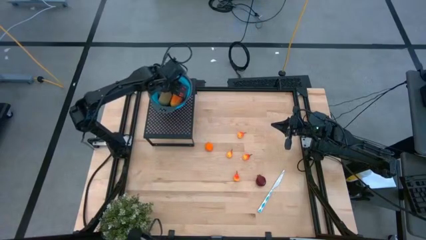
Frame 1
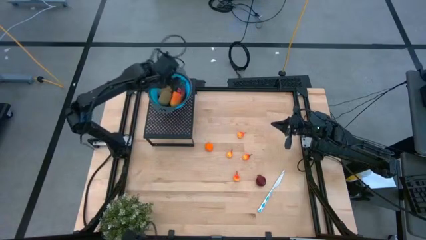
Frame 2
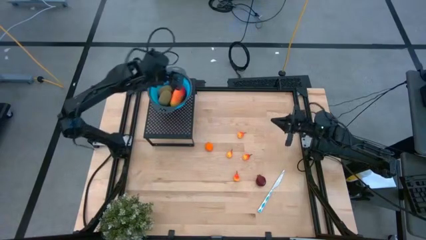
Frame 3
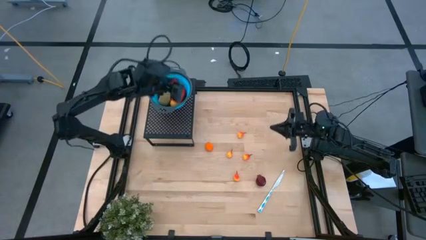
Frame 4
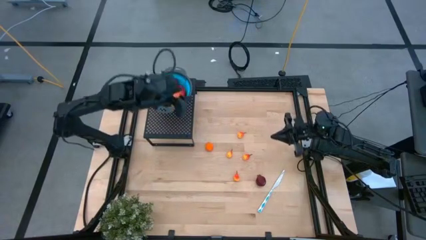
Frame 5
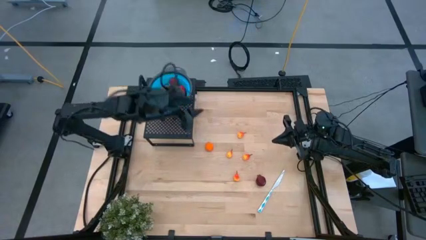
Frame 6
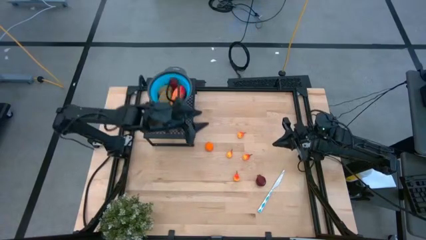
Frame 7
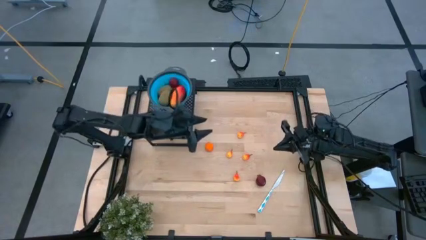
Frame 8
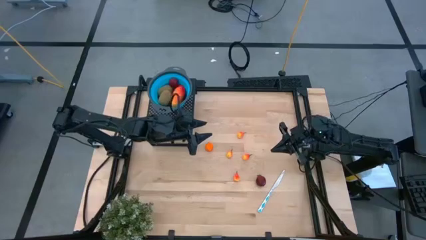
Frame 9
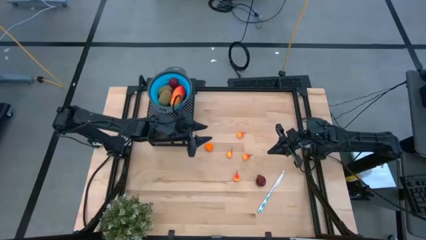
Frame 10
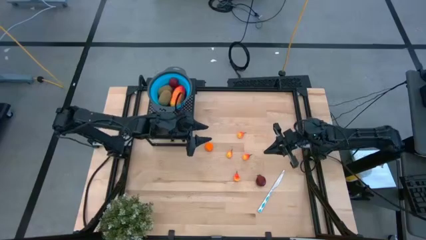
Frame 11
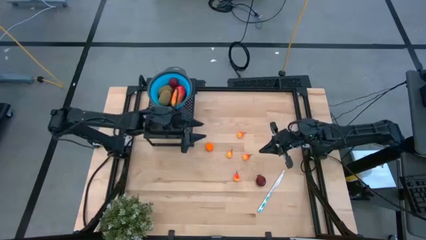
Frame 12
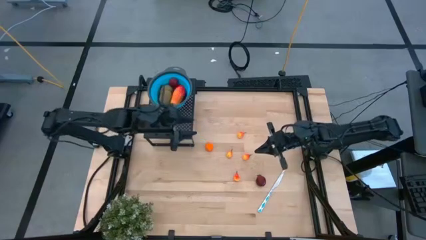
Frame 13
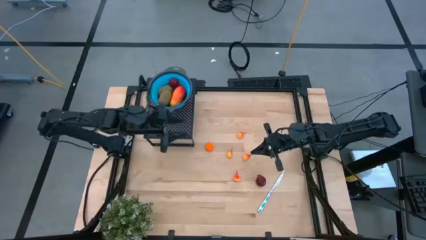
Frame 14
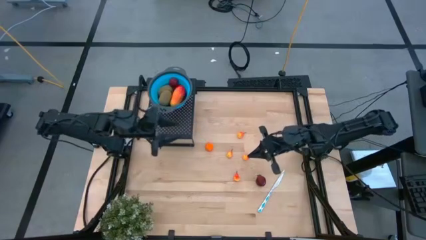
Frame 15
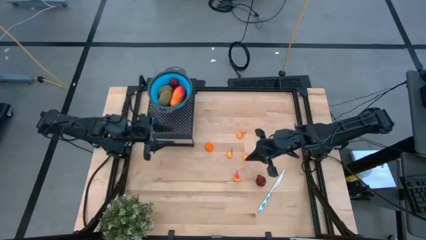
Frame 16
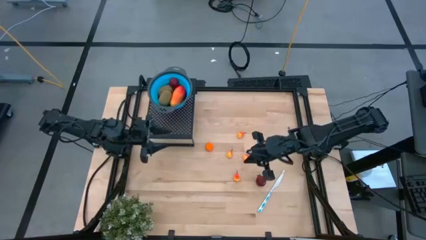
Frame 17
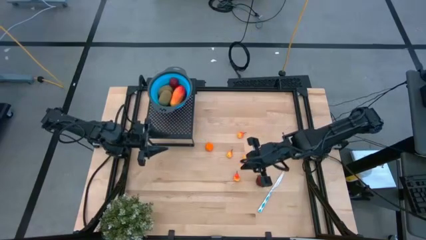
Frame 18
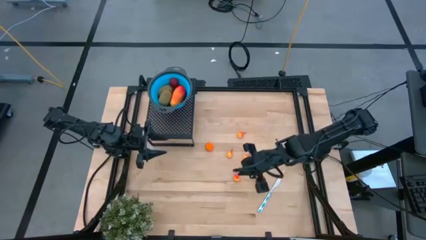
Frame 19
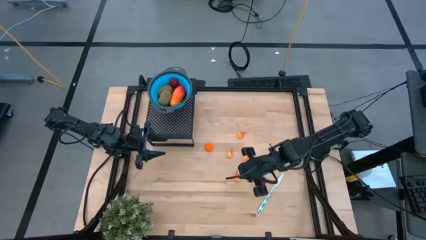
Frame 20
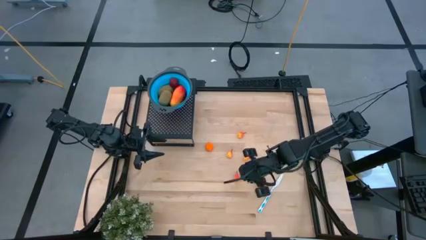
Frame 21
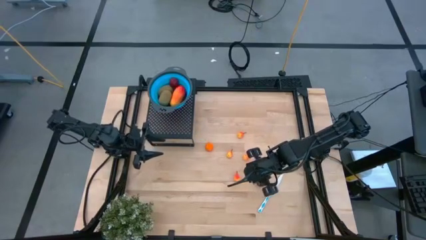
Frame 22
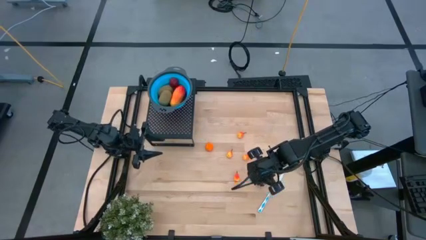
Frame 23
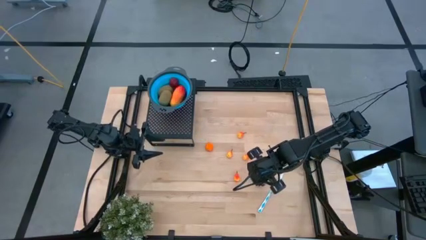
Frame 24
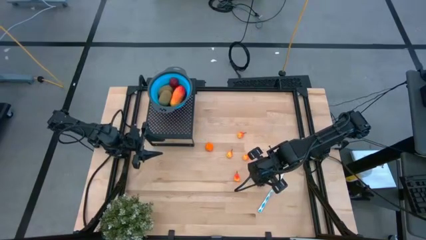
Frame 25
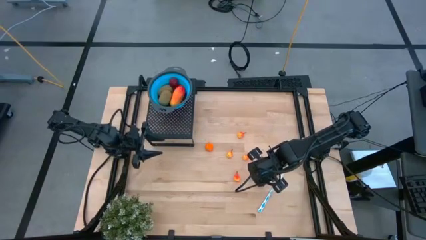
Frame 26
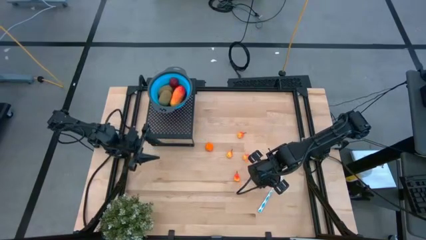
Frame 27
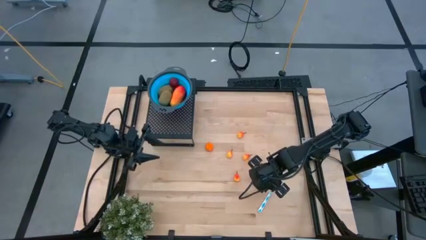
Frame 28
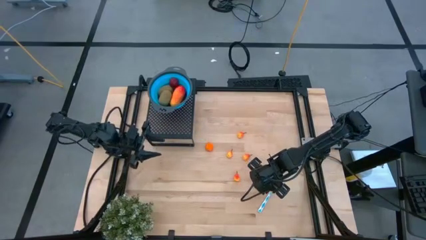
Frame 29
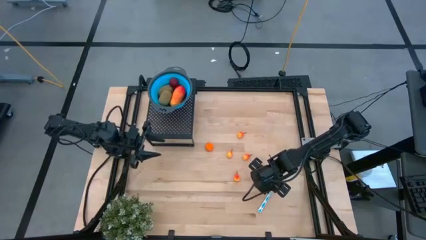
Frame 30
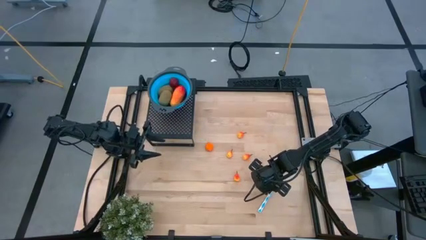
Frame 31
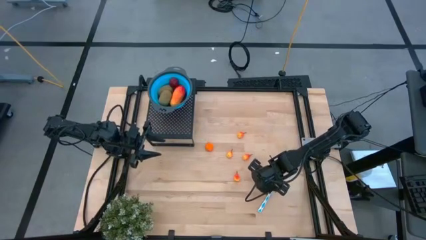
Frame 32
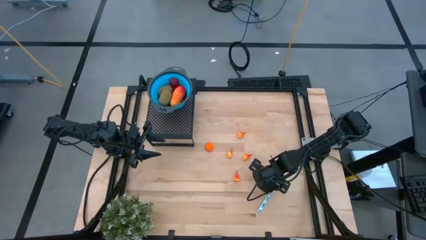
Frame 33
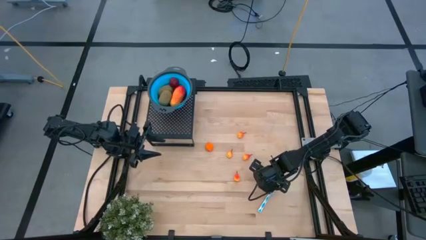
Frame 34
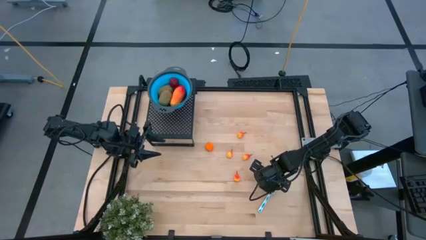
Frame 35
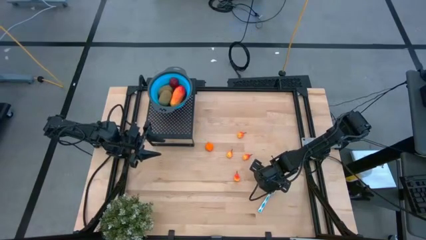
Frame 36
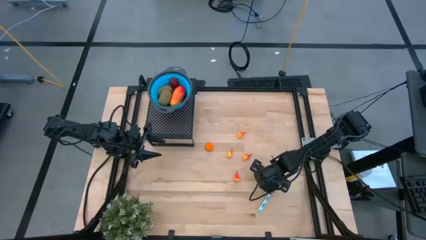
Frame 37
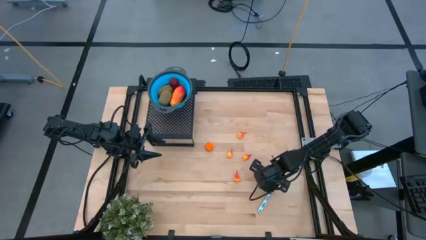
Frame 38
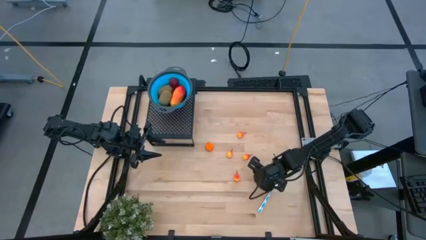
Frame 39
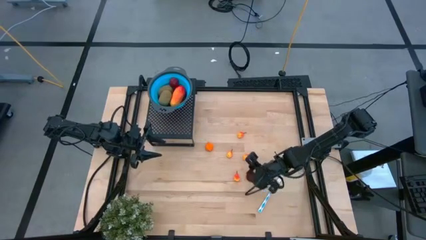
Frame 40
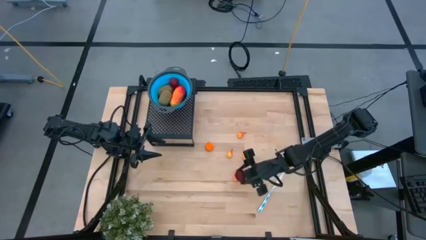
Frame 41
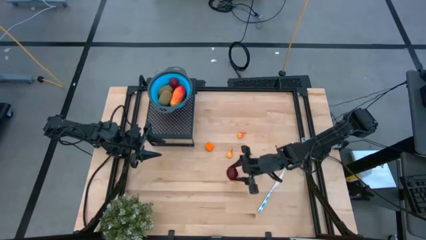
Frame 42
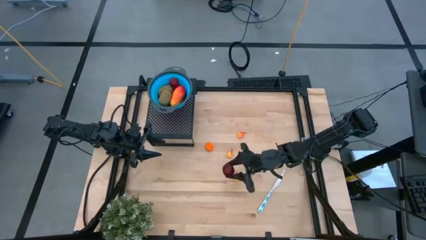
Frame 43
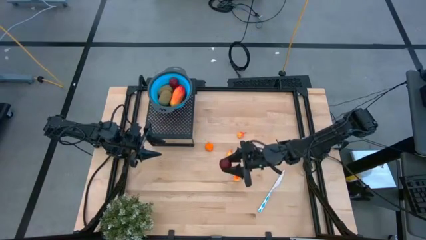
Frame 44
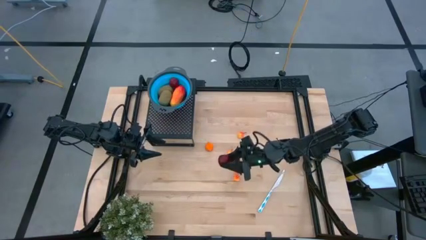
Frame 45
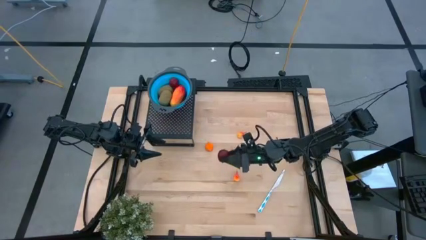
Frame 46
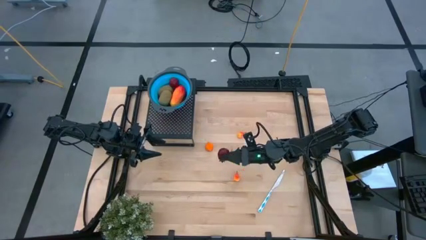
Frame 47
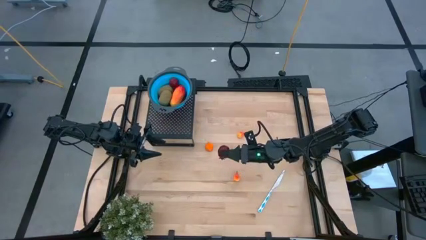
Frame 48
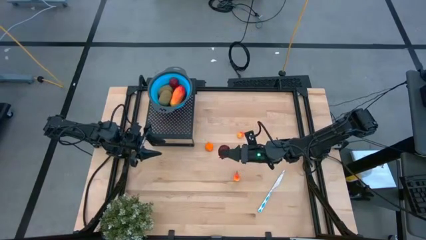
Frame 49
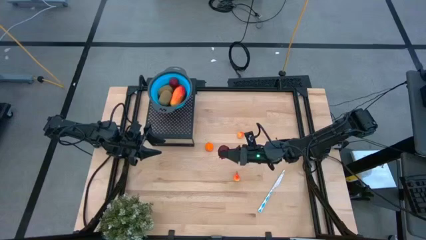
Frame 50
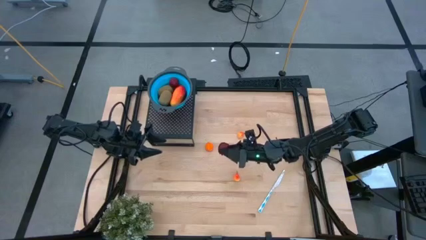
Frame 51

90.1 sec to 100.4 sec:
Task: Pick & Place Fruit
Put the pomegranate into the blue strainer bowl on the shelf

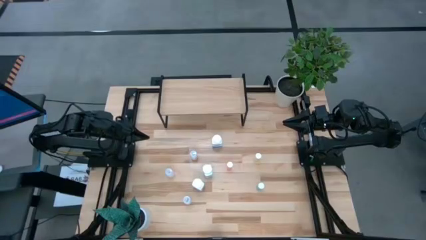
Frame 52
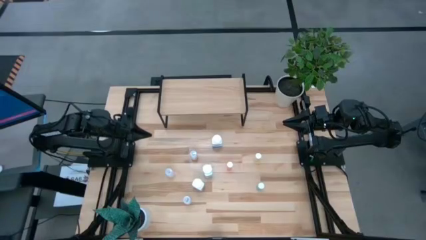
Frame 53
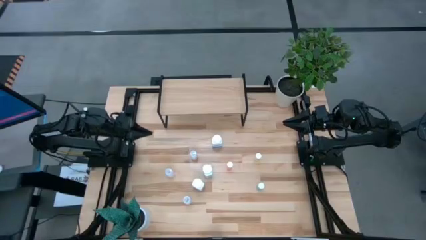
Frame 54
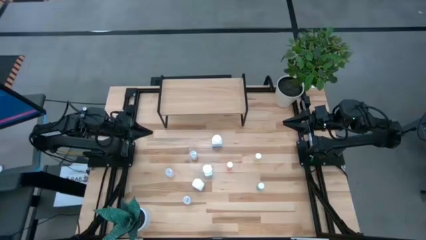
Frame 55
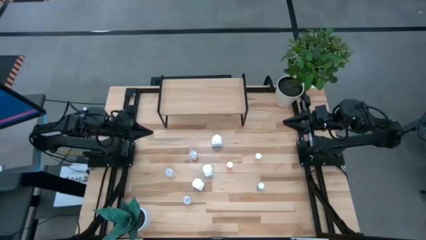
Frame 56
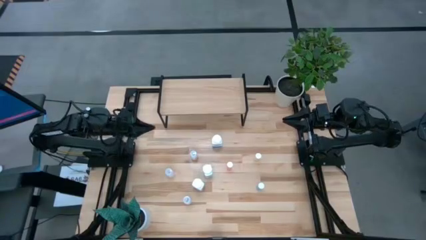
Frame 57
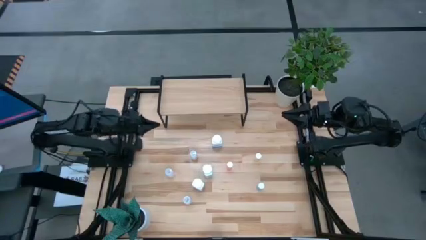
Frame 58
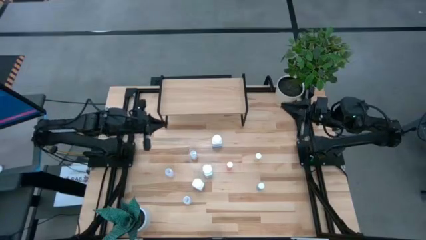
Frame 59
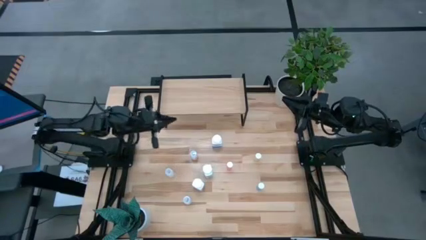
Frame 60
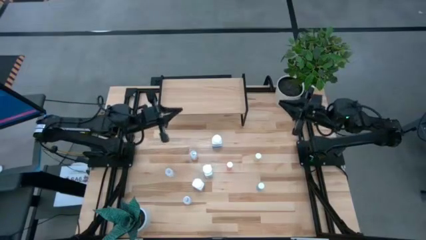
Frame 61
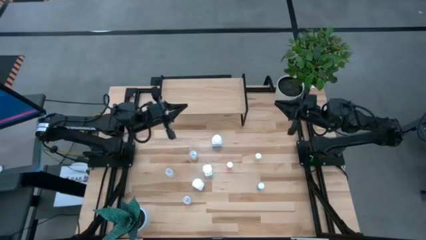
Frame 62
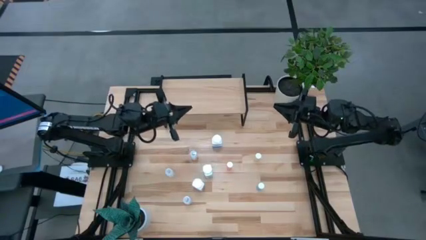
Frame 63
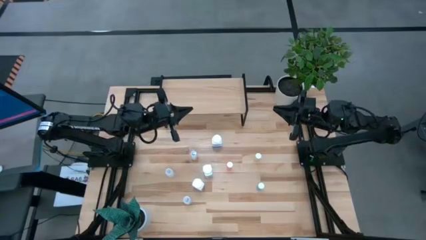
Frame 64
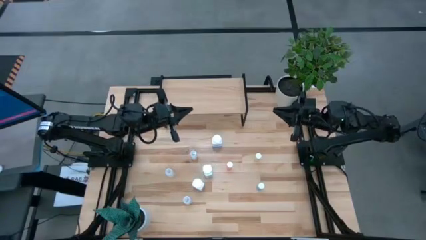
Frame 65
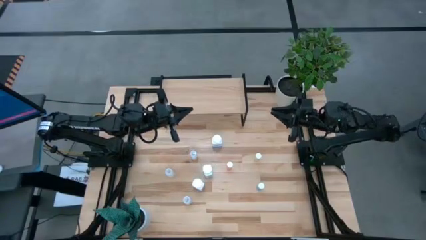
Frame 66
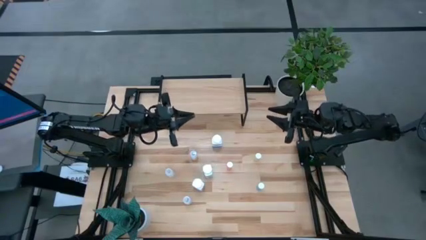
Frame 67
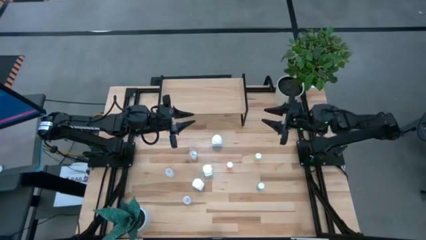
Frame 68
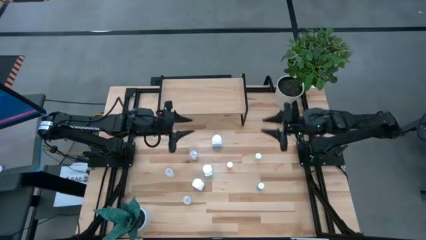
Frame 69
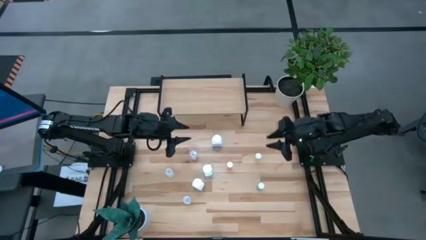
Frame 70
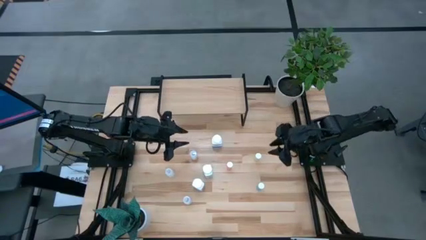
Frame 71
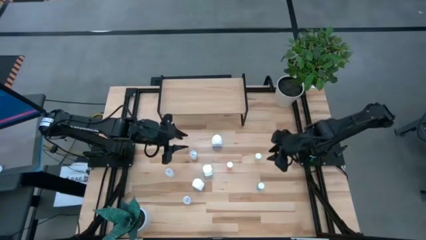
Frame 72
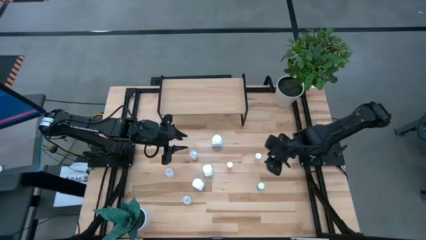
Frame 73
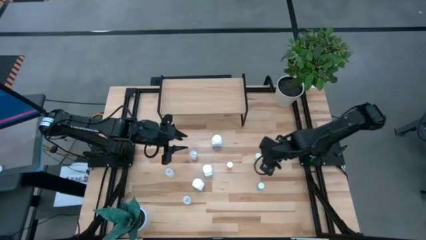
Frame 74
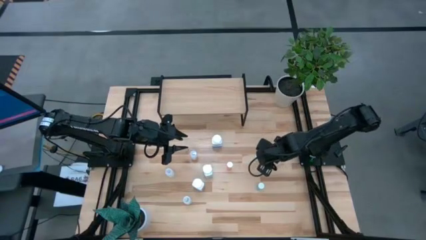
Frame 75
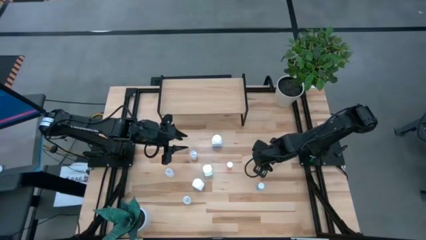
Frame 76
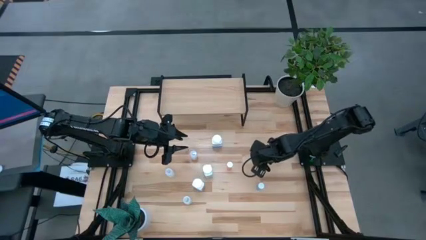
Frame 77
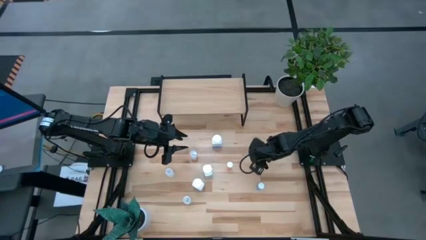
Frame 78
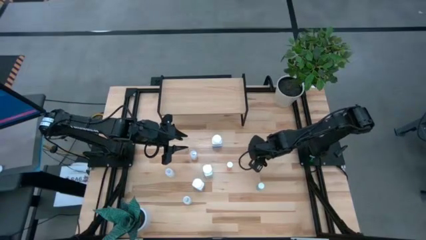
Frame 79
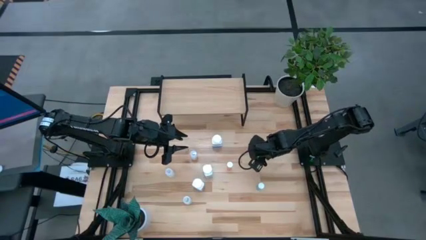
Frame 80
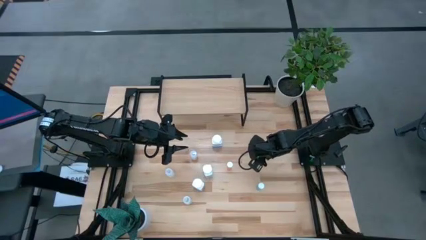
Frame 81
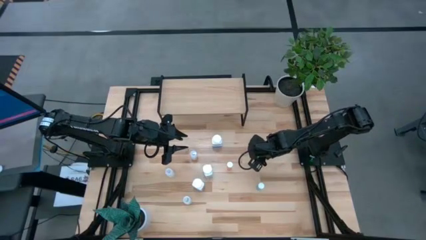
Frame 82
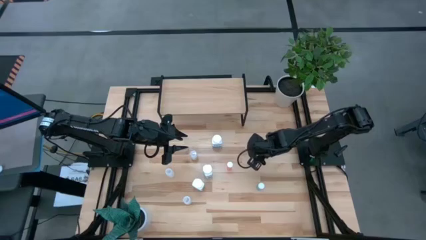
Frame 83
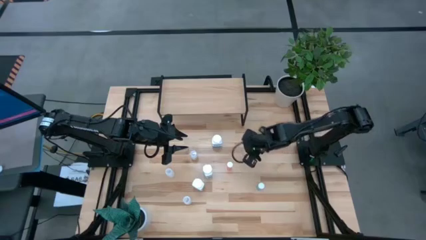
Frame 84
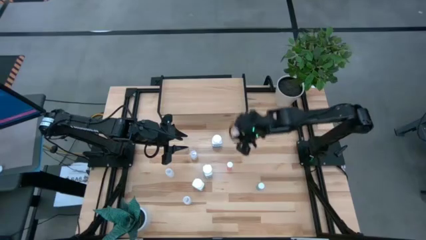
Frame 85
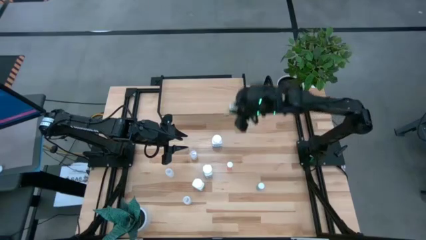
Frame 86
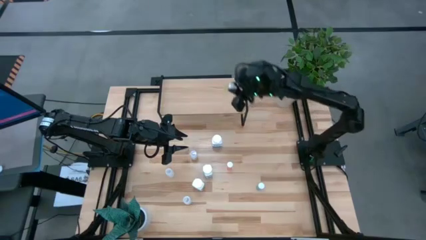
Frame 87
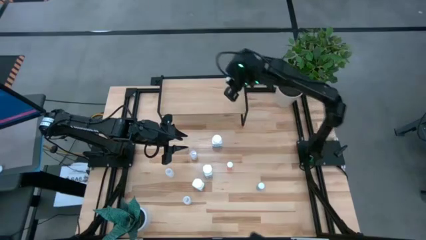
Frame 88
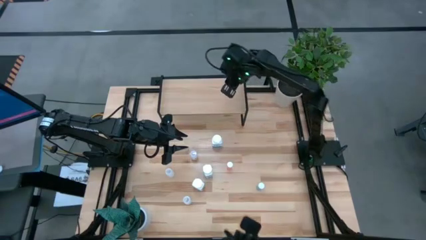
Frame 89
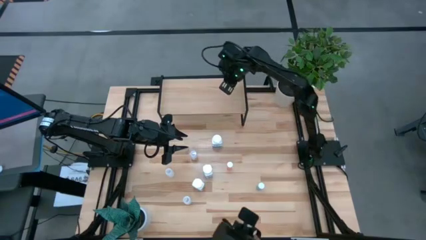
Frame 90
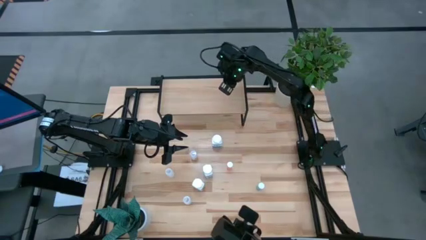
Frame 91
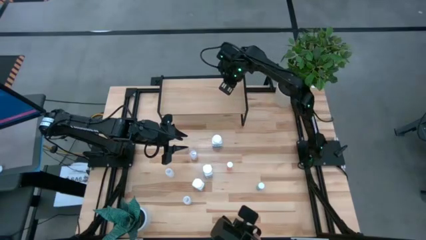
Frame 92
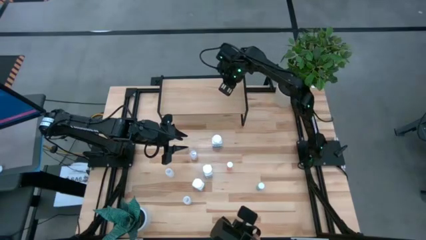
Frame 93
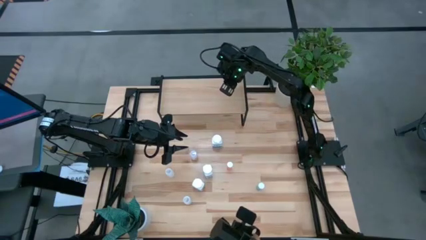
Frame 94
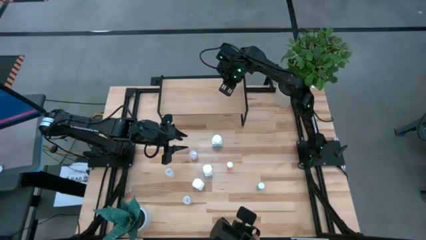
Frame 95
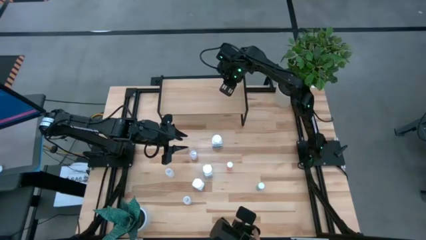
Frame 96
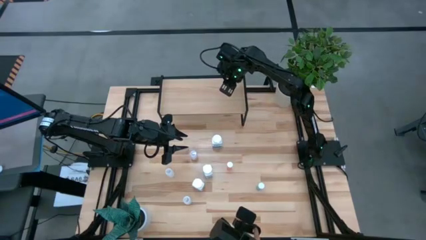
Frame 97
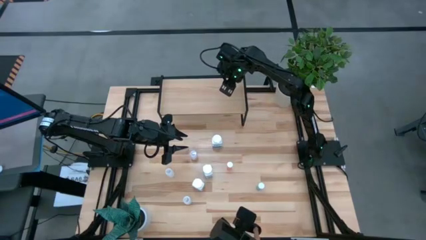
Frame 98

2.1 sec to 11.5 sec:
Task: Pick and place medicine bottles onto shelf by color
Put the yellow pill bottle on the shelf
